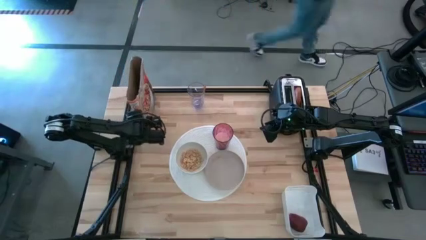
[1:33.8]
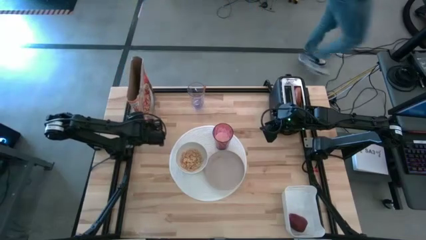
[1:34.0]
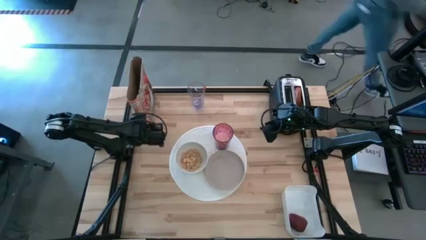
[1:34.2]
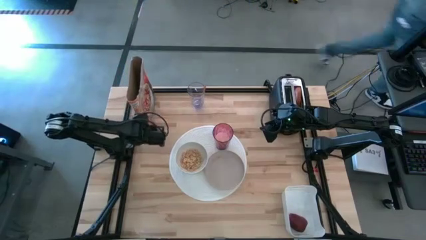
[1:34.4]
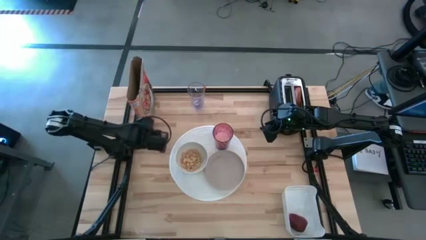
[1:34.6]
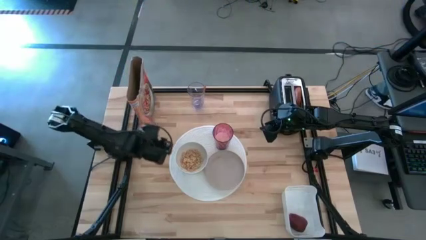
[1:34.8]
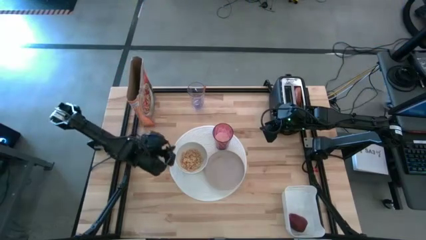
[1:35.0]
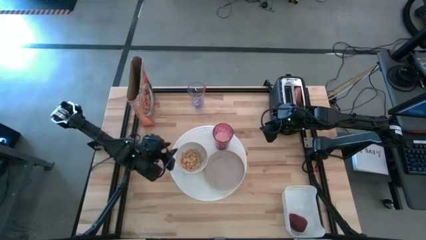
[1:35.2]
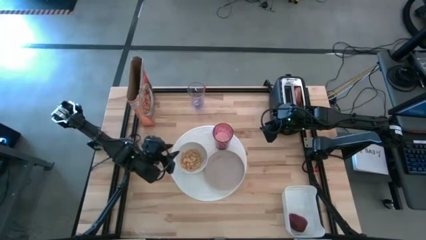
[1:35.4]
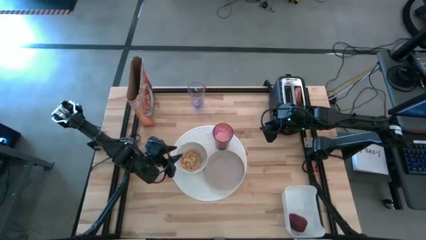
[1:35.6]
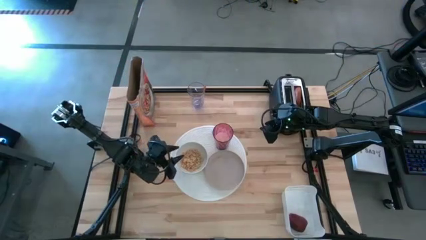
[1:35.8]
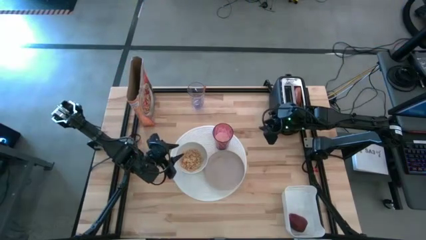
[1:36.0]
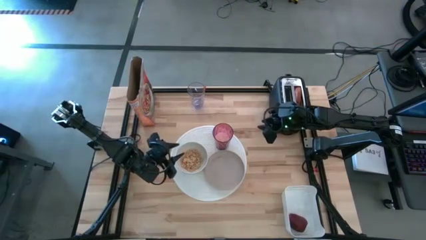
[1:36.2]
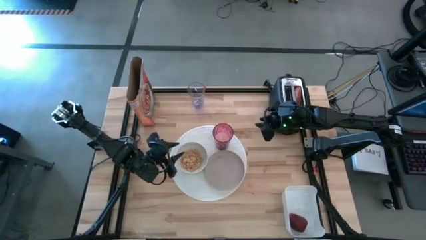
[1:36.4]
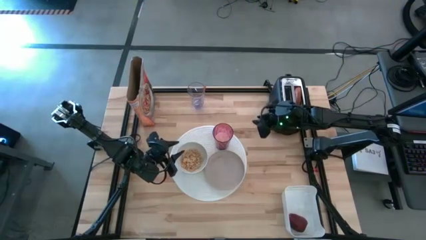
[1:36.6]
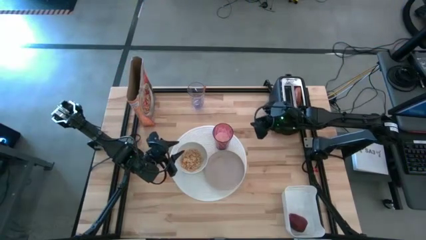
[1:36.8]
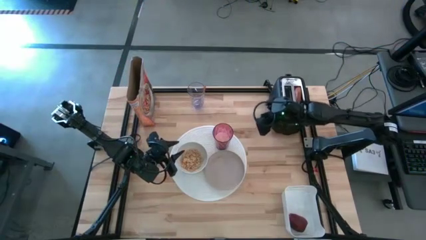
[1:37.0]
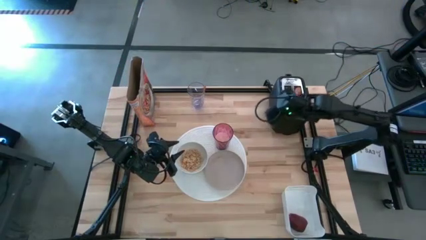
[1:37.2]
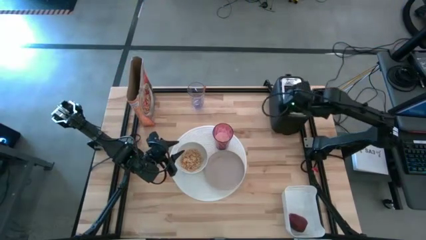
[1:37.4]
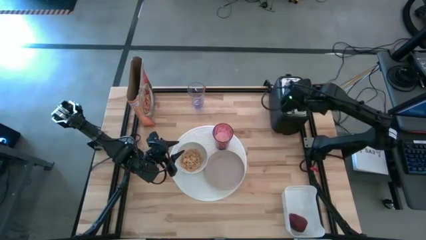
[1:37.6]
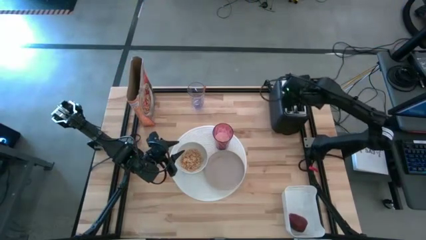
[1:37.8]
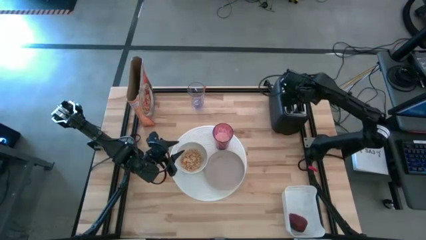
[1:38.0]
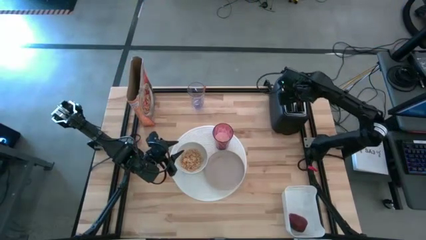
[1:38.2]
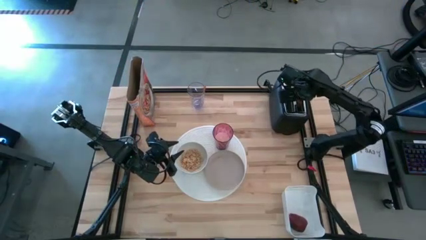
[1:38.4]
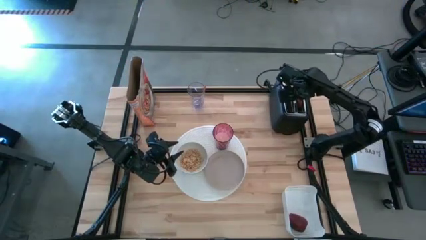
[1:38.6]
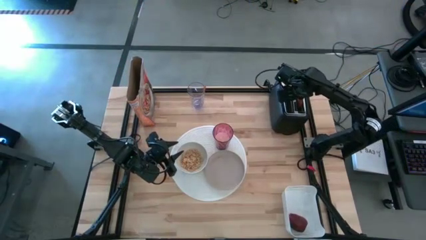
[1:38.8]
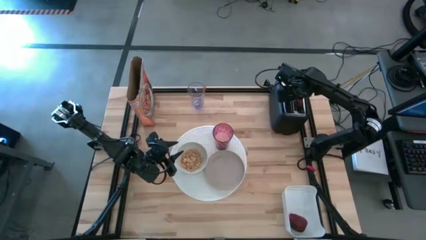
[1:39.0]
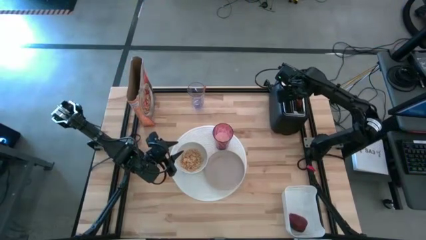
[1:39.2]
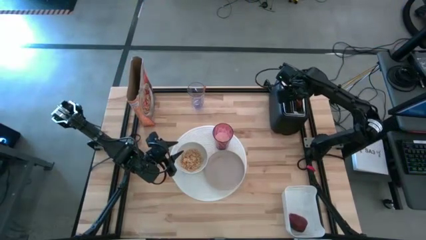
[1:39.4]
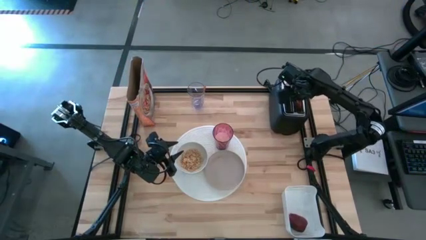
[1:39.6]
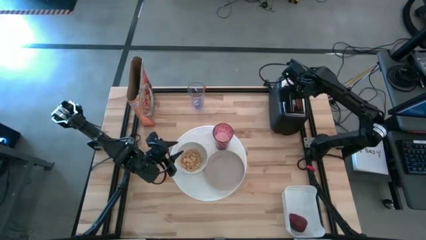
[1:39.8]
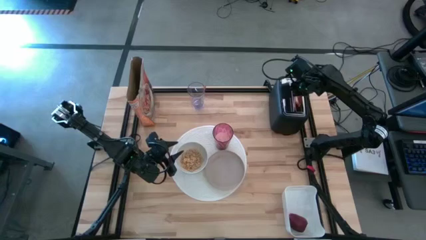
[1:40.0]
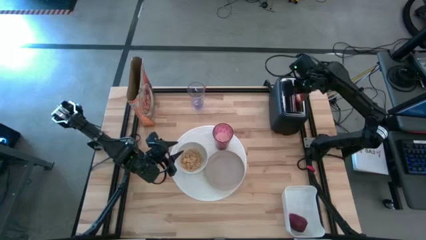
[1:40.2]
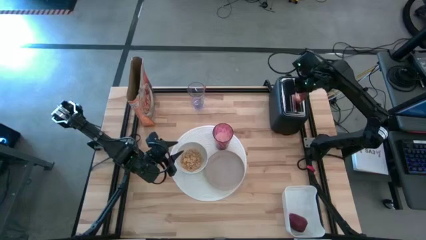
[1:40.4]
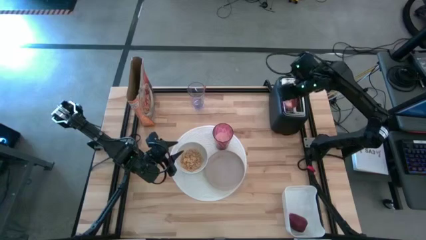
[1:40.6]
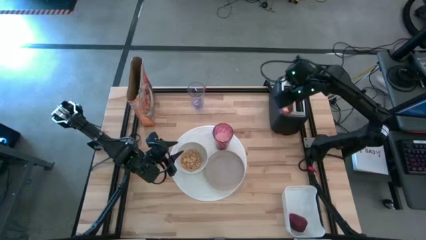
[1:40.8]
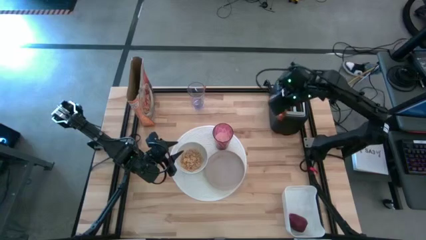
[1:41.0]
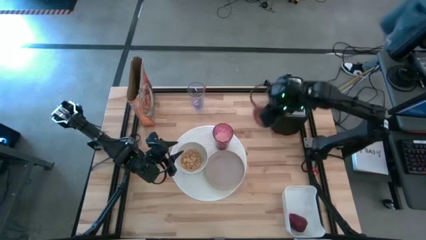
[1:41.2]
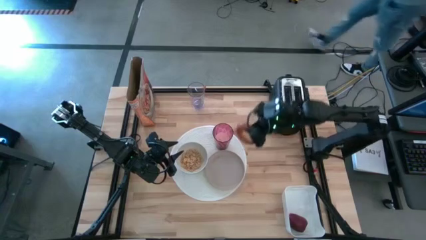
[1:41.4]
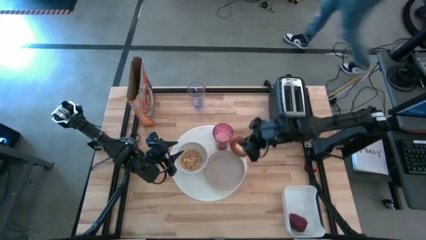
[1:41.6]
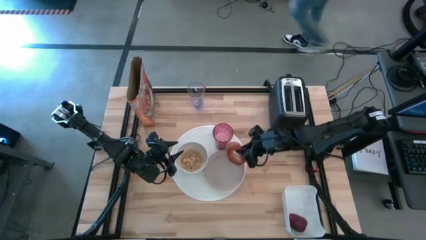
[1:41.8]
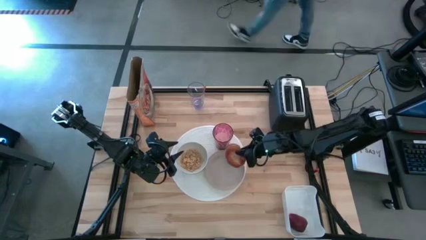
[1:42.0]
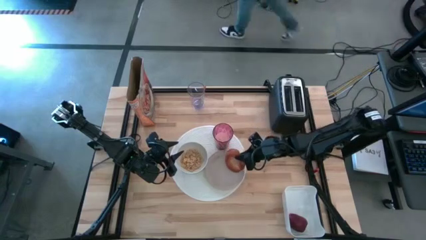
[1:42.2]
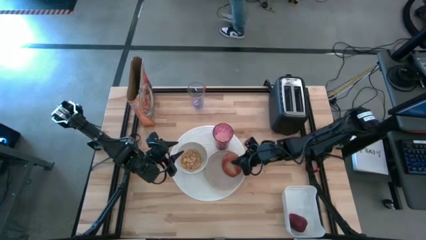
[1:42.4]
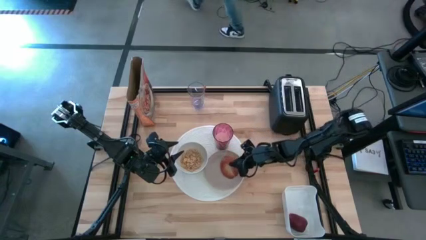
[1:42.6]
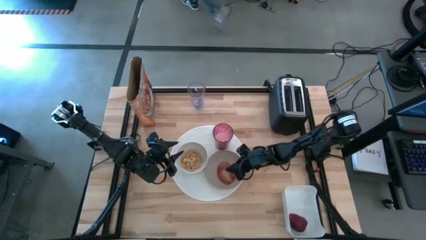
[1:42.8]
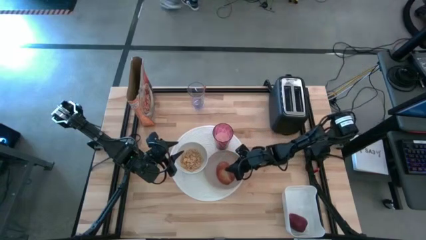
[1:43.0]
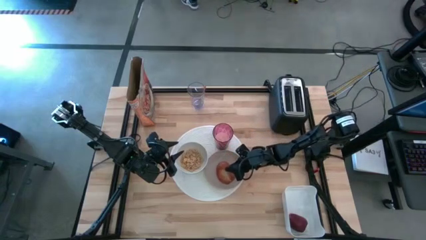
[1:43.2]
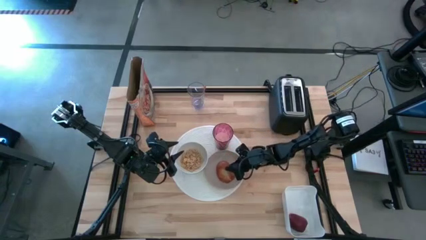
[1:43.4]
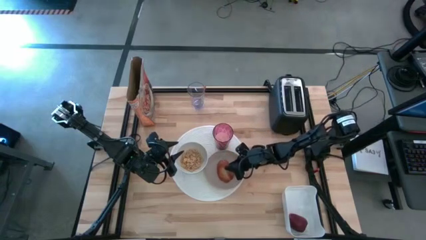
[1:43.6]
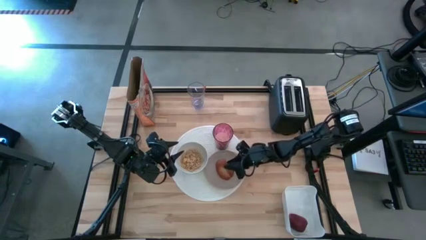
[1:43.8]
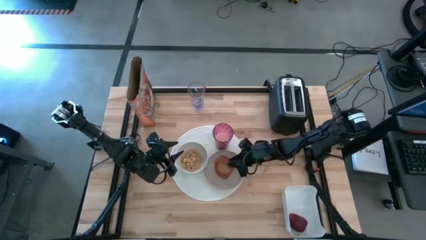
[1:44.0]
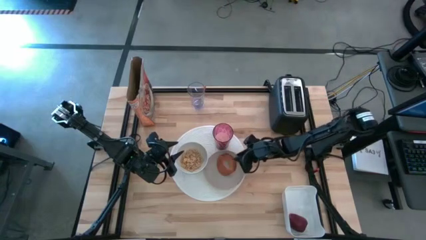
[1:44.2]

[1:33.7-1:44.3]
Task: Arrange a breakfast setting
Put the brown toasted bread on the gray plate

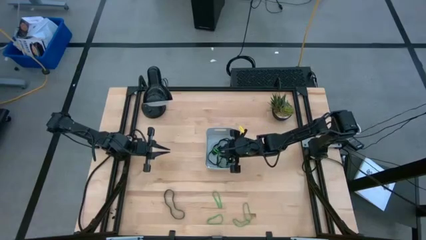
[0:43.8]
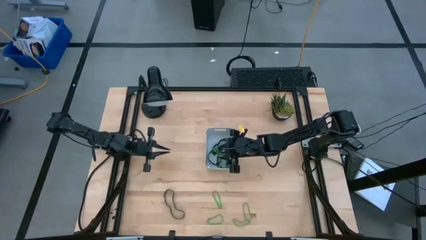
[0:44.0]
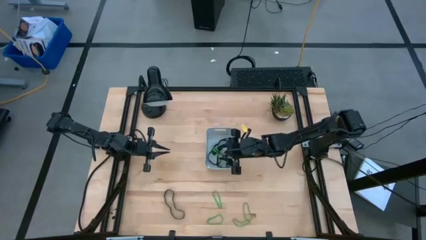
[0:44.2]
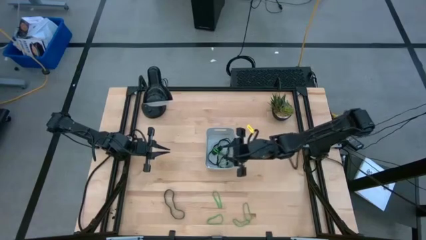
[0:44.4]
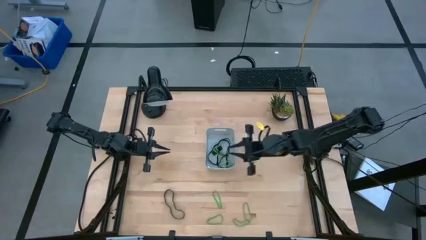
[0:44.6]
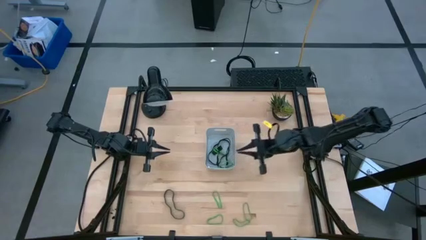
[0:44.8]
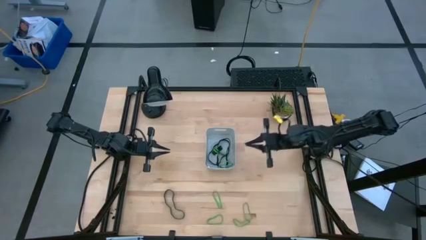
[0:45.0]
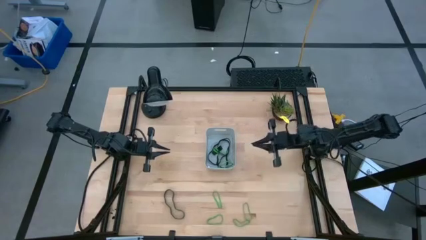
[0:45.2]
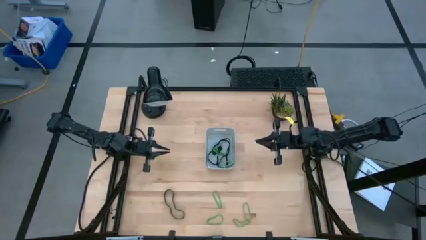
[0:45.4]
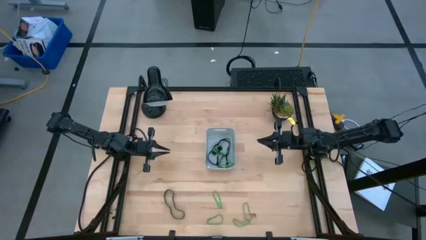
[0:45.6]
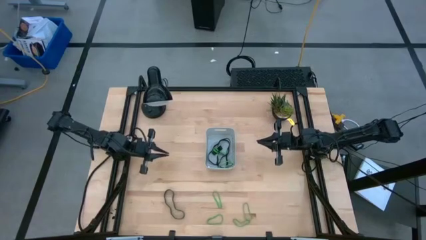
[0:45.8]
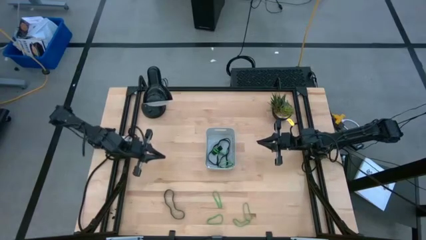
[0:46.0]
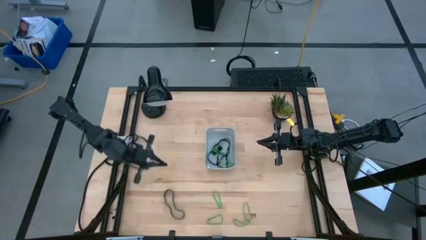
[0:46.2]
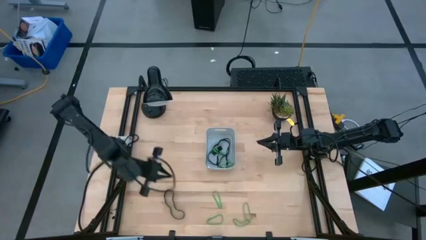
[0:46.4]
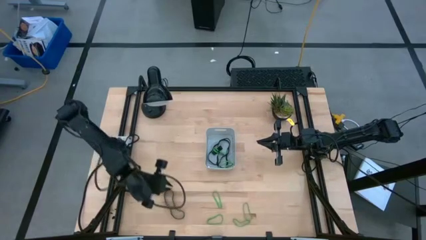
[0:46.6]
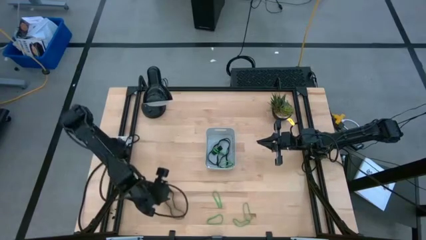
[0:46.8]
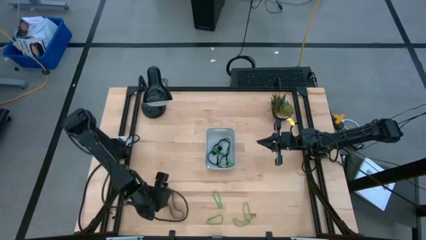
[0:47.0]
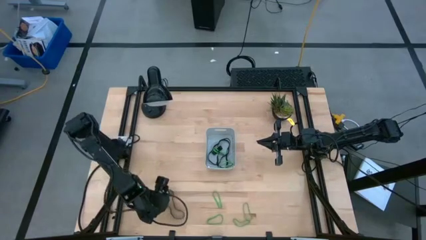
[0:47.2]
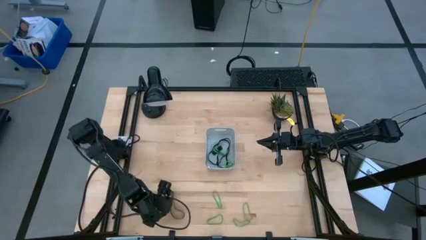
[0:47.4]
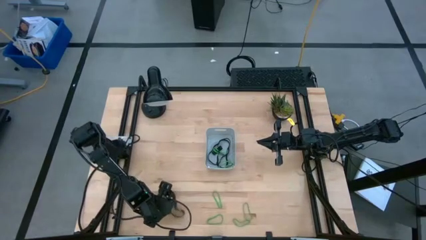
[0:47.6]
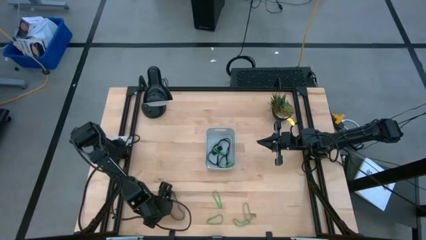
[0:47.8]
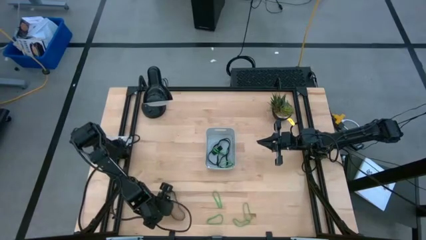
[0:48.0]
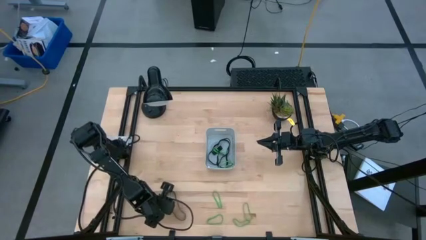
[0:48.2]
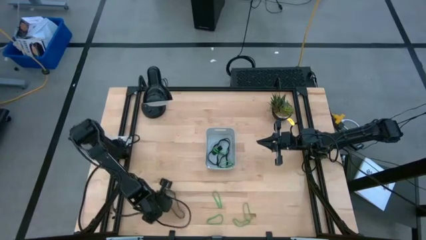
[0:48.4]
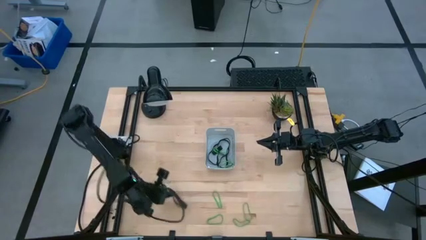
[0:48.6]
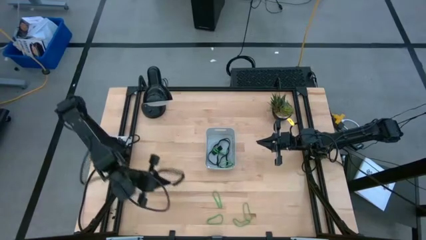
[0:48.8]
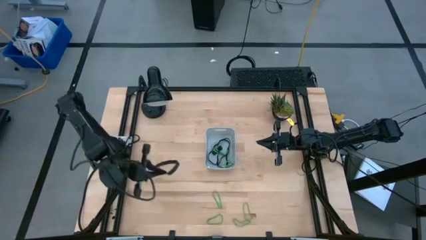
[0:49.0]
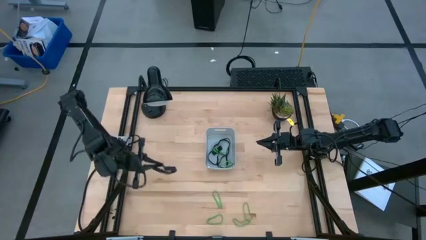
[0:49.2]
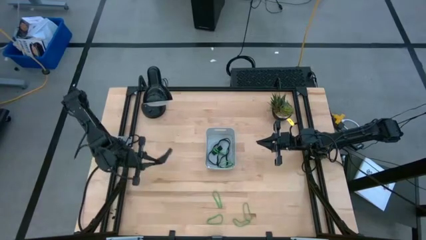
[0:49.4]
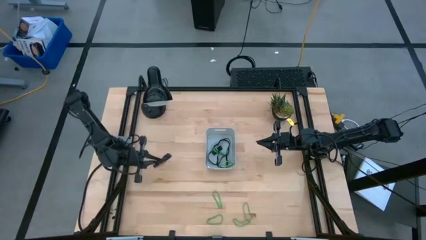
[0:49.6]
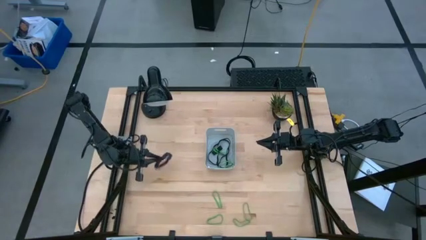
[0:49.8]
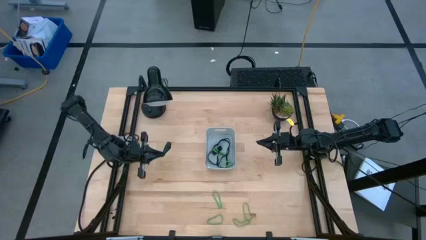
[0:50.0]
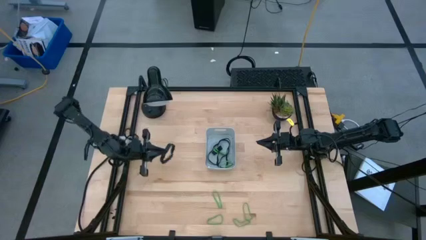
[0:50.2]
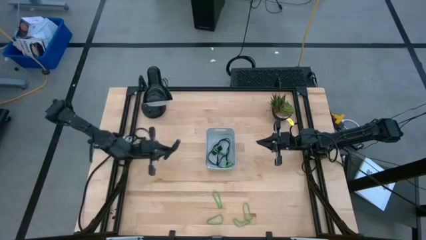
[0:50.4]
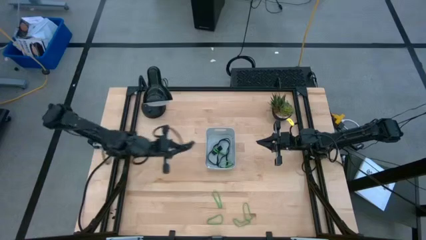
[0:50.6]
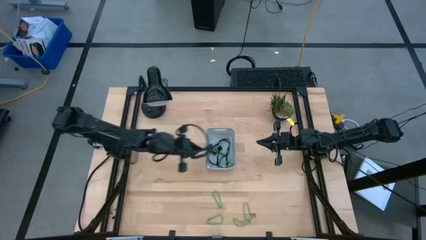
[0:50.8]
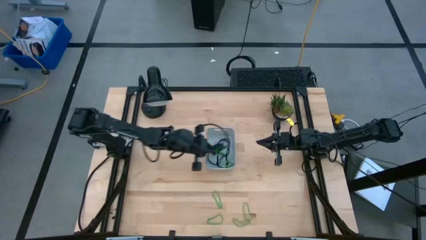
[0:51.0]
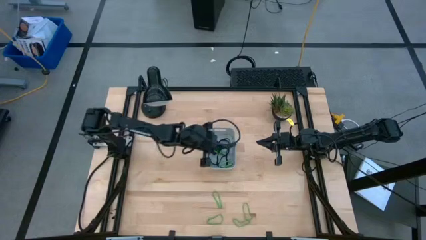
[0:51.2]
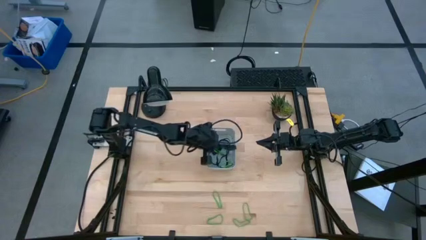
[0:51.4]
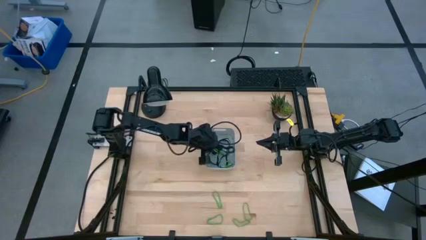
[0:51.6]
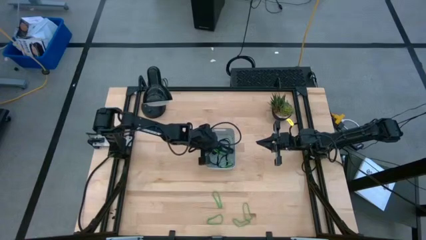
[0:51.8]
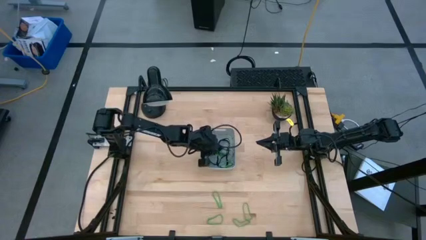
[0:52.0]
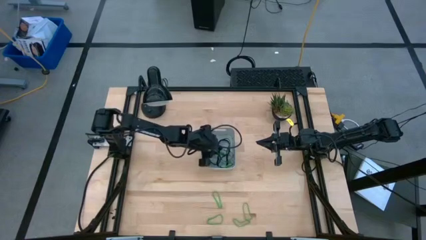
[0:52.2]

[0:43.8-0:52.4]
Task: Pick and place rubber bands into bin
Put the black rubber band into the gray bin
